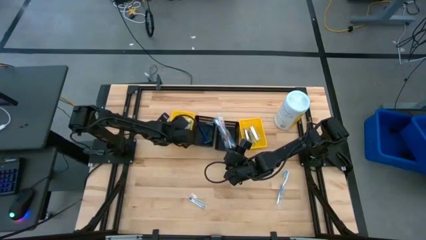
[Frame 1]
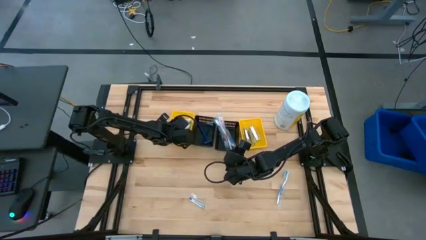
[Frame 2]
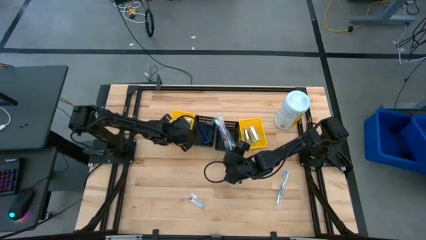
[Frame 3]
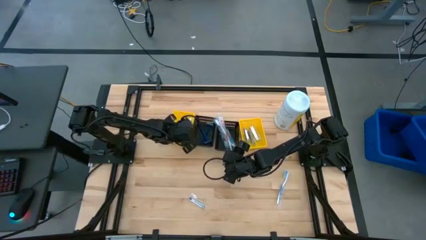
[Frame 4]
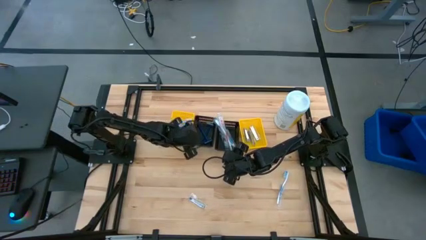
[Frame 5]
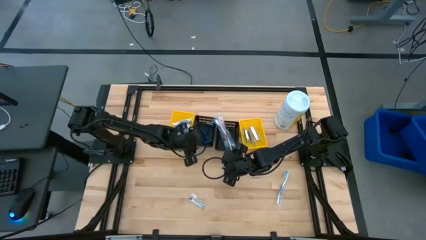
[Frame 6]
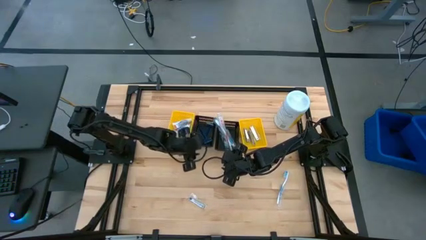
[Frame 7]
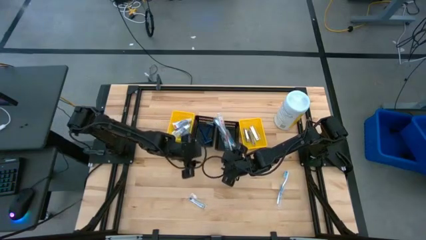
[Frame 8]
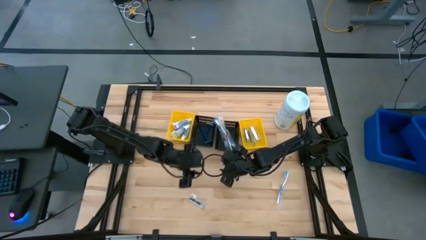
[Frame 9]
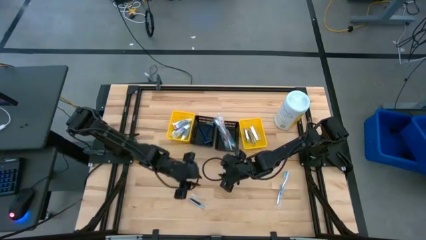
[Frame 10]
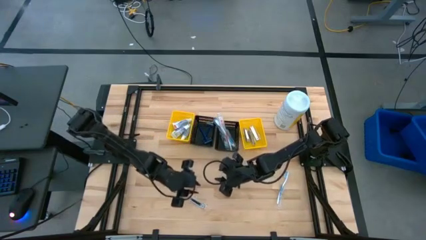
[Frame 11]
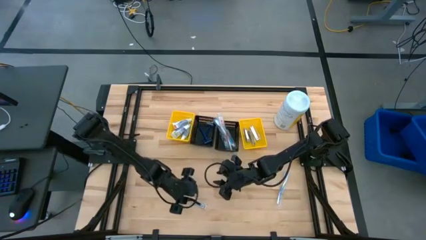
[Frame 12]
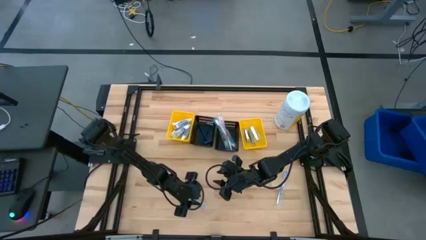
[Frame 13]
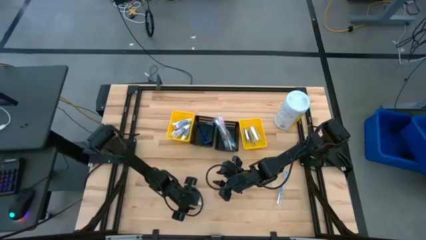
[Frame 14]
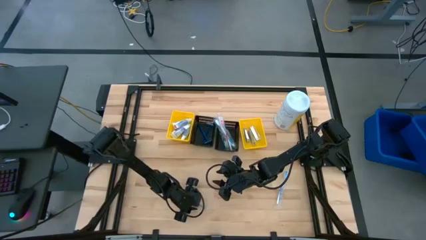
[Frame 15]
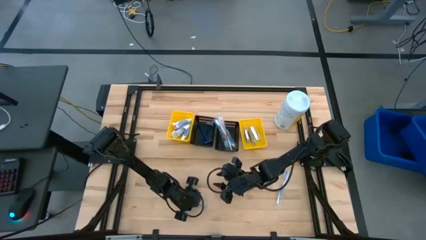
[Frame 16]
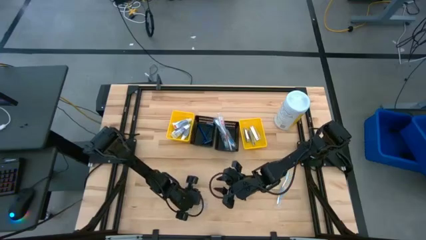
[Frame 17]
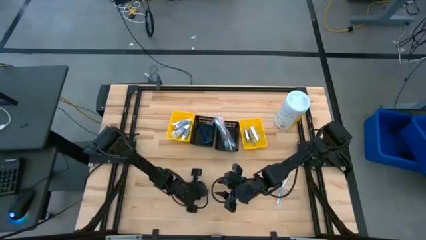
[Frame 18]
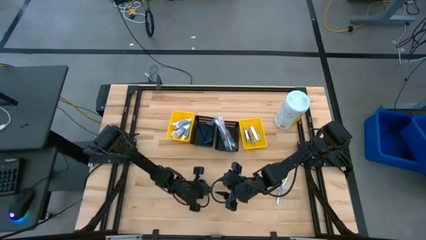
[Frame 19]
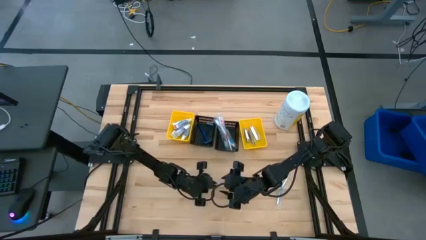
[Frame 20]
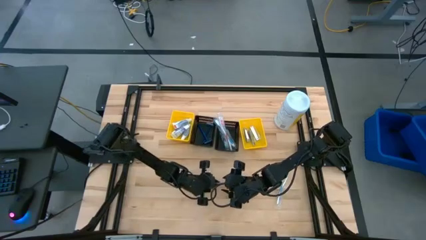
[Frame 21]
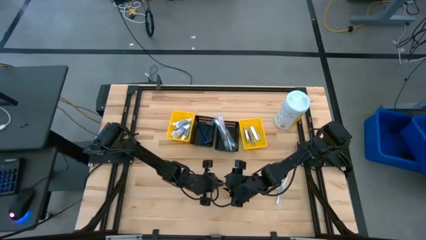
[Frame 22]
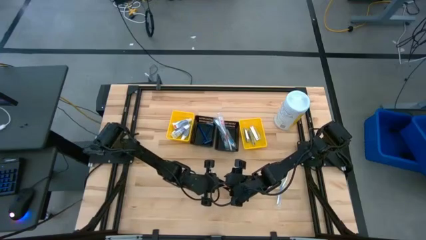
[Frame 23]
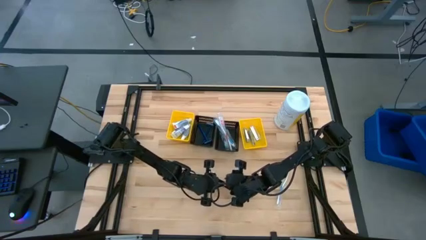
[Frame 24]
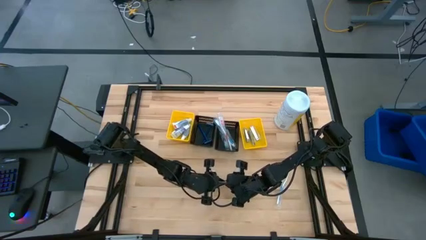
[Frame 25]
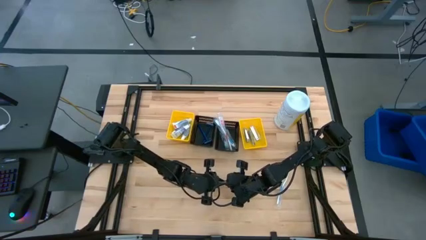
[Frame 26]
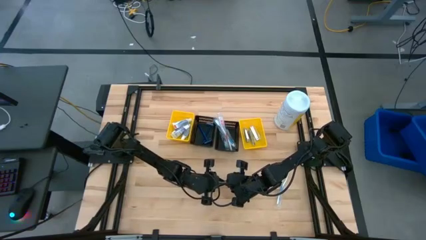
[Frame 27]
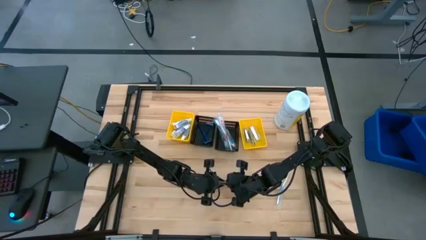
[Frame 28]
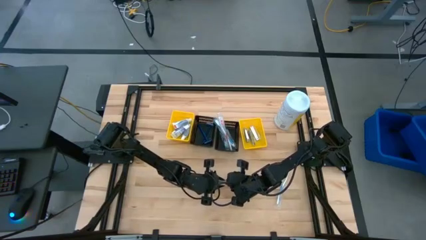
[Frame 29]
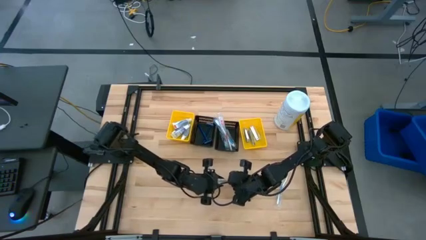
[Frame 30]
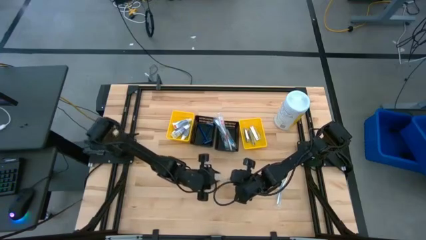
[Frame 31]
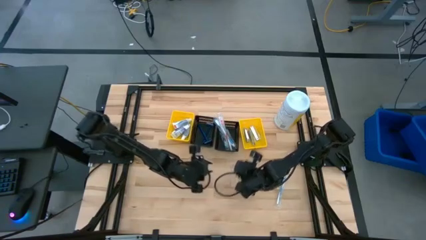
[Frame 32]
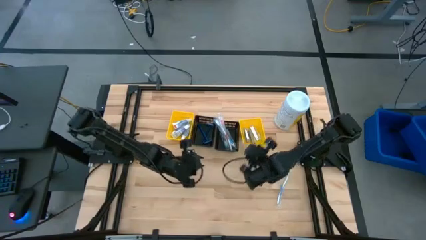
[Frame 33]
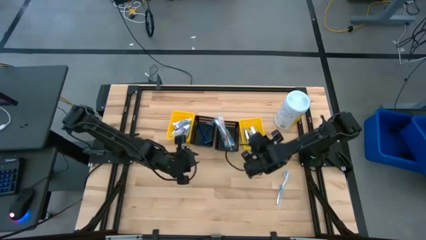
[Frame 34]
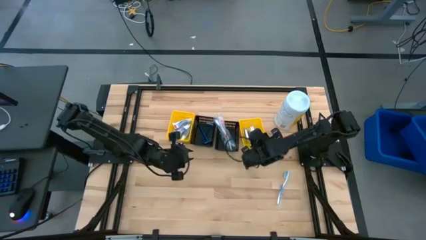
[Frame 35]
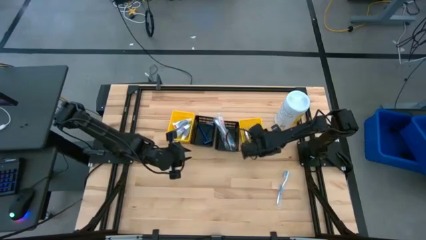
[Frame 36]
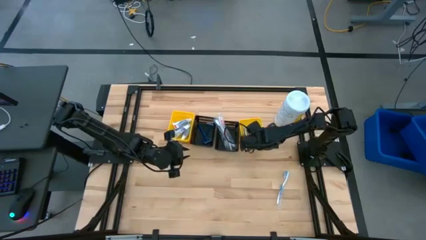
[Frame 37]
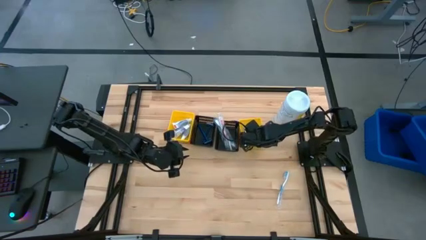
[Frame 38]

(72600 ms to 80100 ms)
Task: Pick & Place Travel size toiletries
Put the silver nail cutter into the right yellow bin

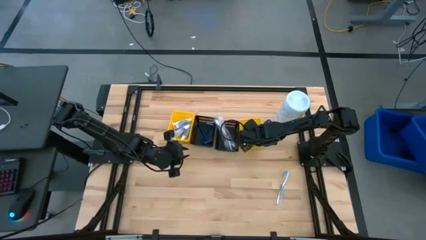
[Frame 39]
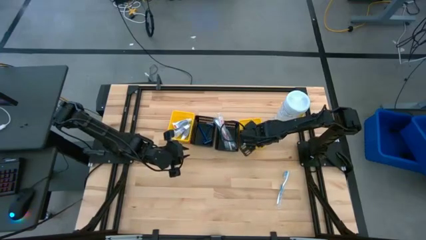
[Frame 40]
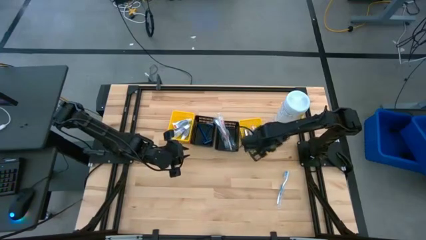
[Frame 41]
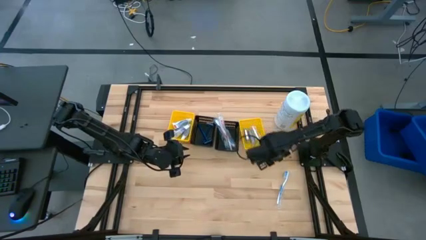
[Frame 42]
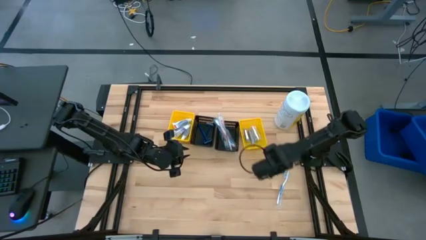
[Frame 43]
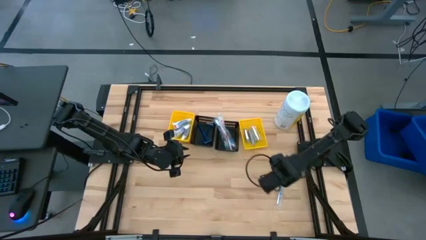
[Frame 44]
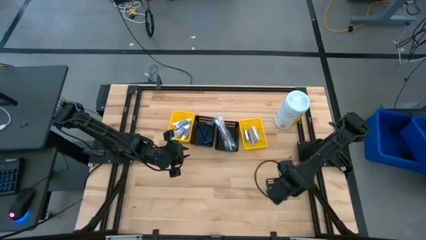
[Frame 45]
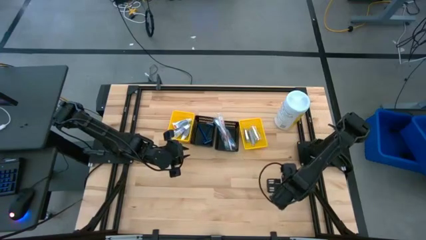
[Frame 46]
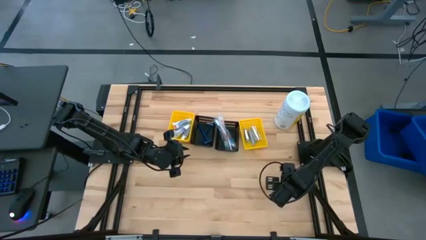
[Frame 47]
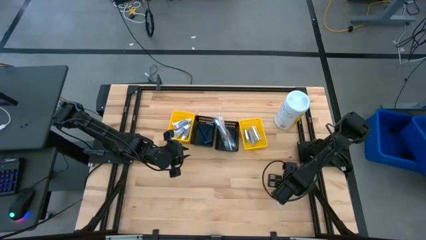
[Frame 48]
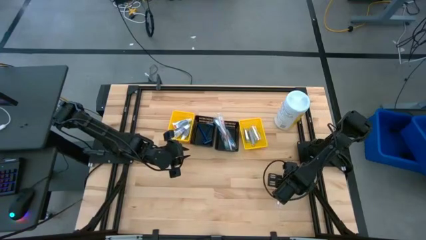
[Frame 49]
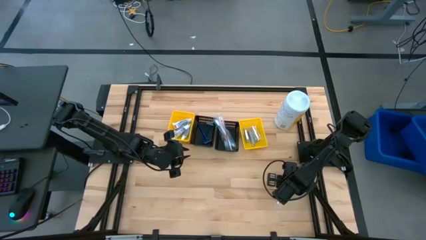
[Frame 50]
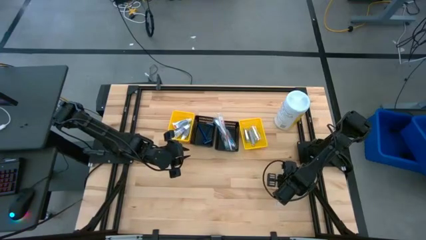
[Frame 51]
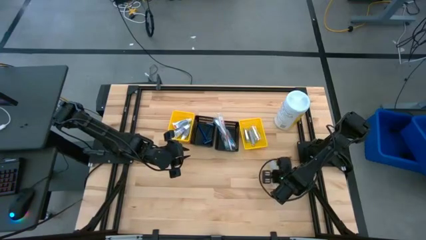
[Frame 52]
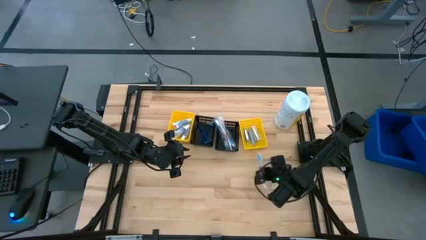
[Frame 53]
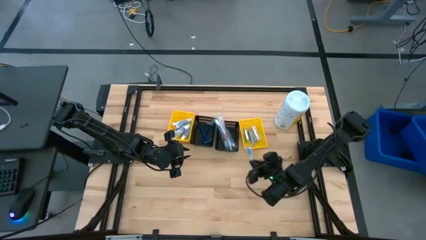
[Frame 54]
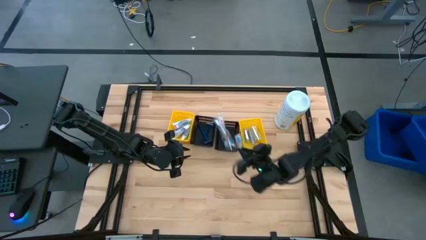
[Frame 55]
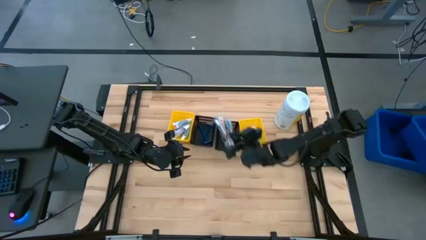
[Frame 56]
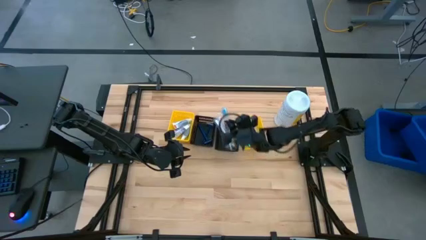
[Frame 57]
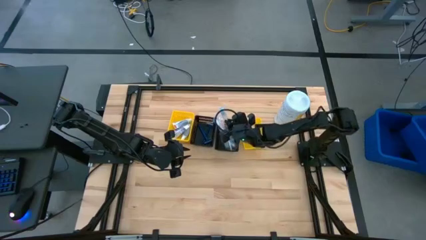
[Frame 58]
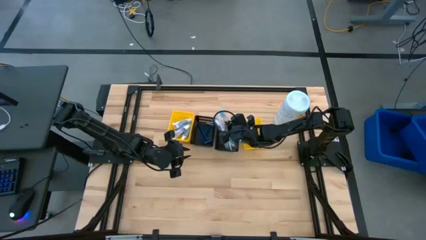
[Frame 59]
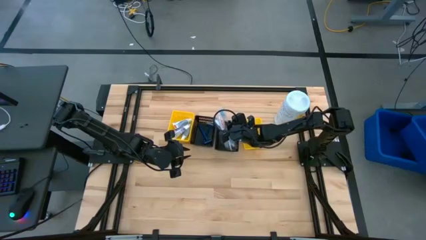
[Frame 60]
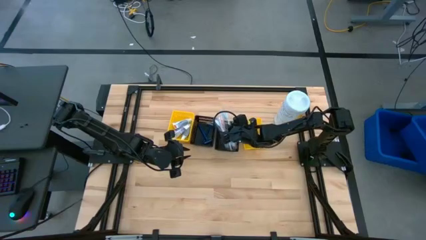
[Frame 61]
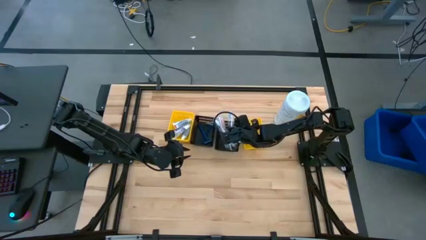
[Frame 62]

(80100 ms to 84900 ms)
Put the blue toothbrush into the right black bin

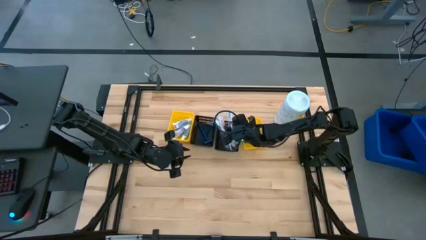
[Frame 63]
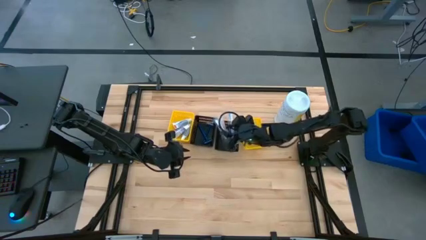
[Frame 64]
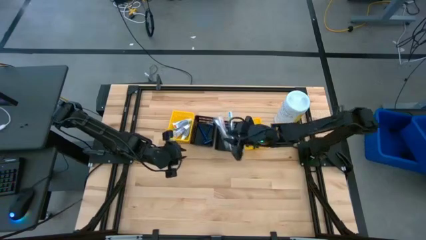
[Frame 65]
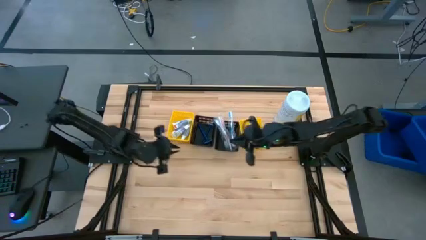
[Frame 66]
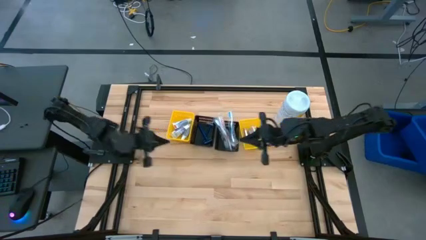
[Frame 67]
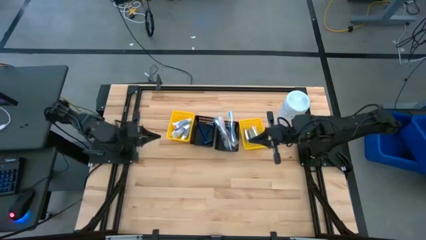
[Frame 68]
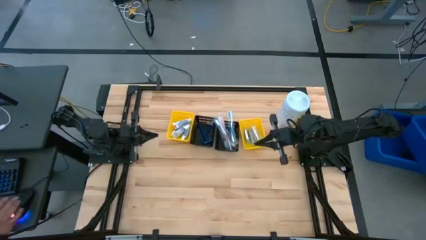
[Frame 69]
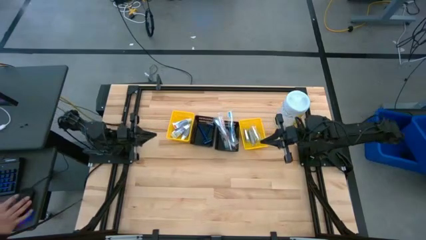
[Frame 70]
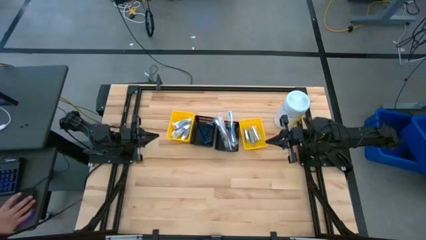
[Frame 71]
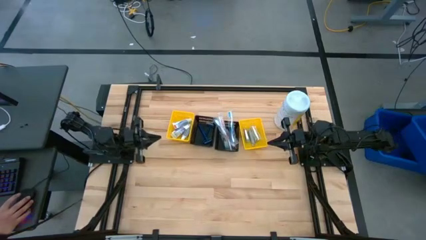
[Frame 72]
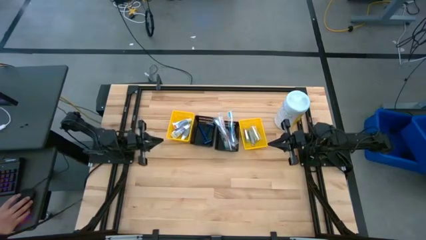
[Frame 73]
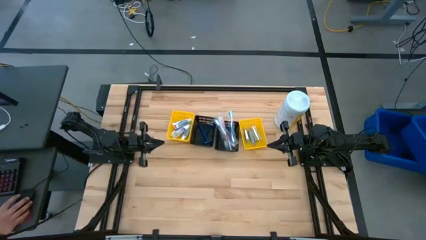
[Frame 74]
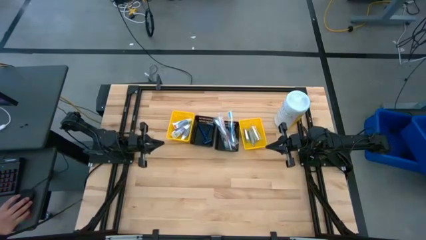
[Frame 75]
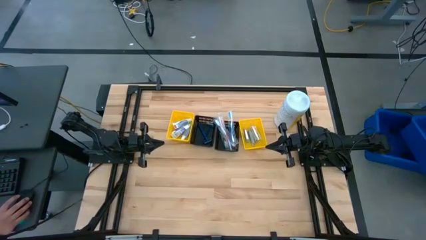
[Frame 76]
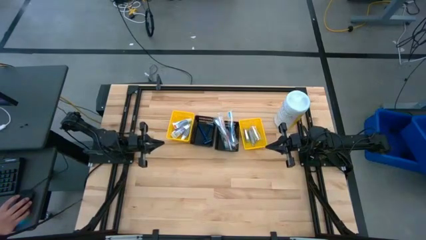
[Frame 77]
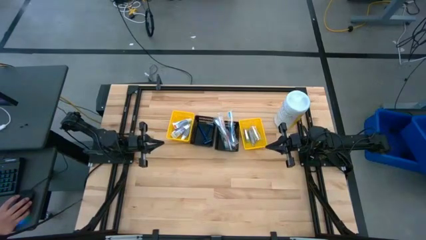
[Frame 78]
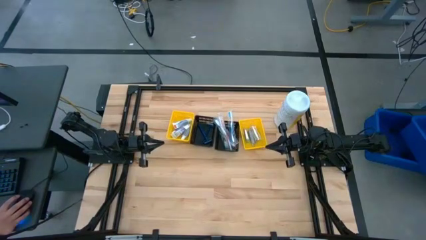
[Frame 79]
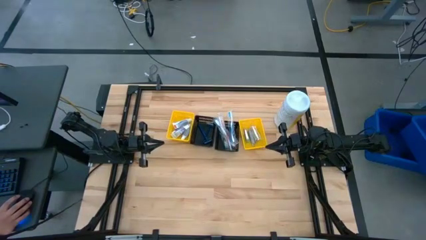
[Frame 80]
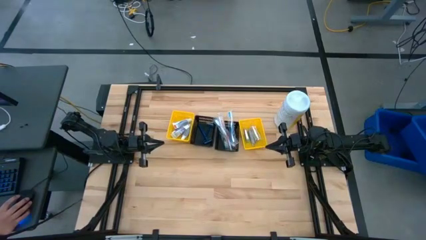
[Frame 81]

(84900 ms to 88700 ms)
Return to Home Position

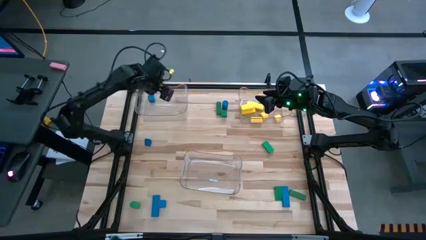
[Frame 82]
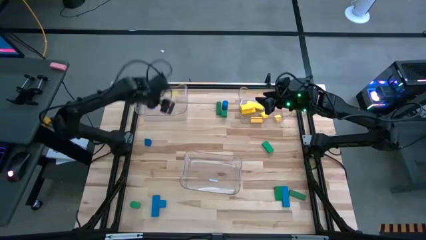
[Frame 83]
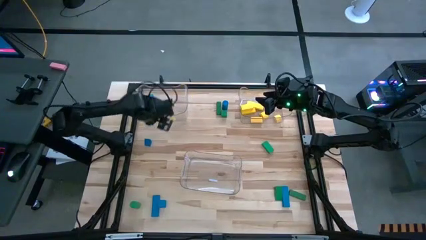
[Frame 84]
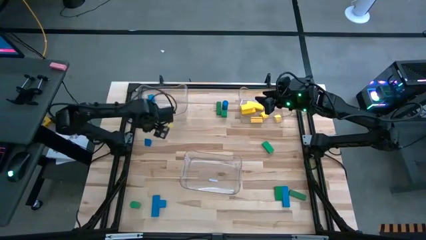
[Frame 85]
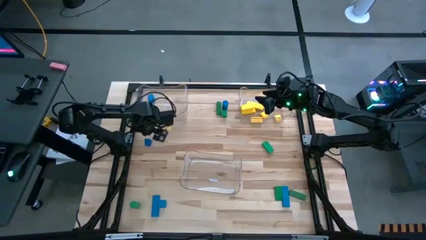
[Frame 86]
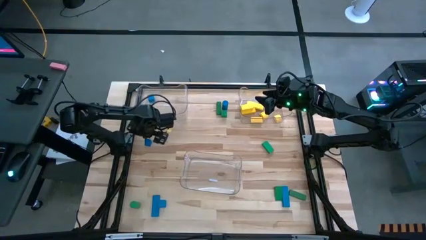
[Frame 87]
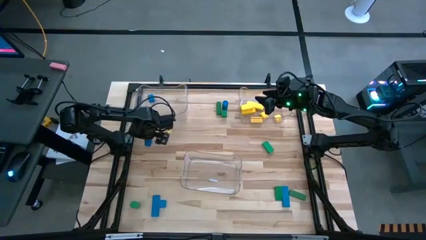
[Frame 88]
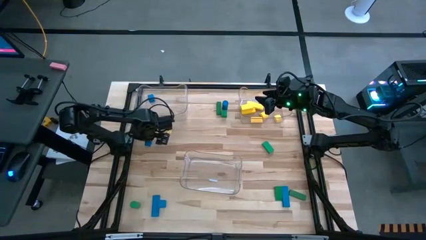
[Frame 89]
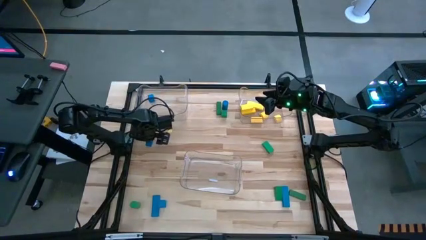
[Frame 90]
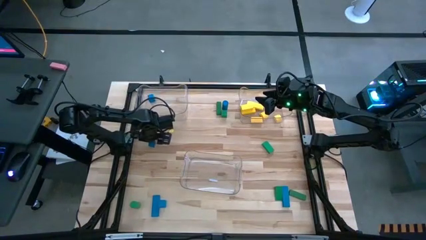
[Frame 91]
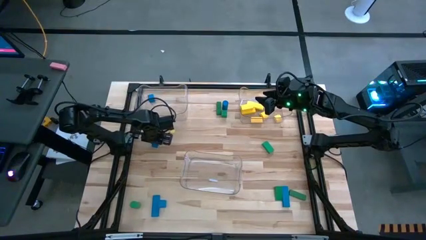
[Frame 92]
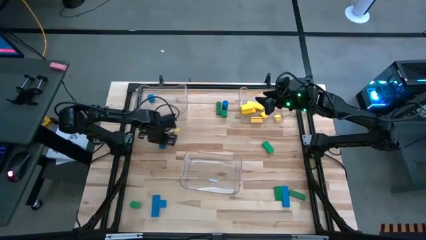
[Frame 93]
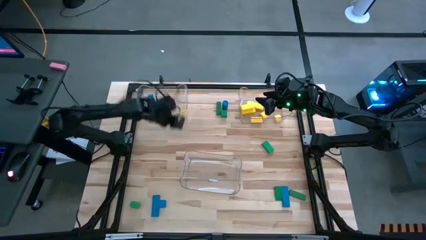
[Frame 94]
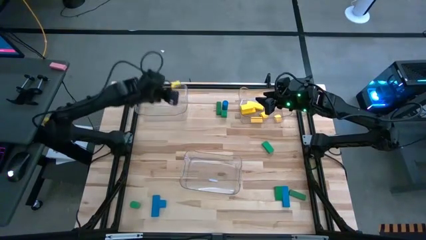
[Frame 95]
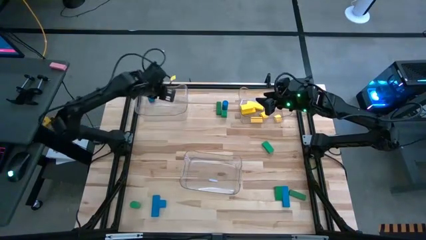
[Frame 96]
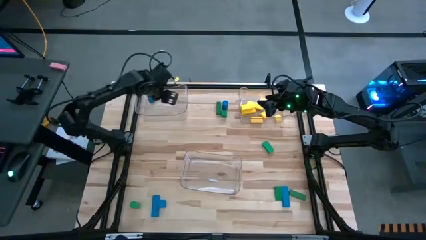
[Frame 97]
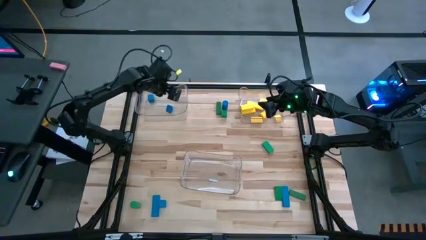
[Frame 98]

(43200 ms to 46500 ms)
Task: Sort blocks
Put the blue block into the left transparent bin
